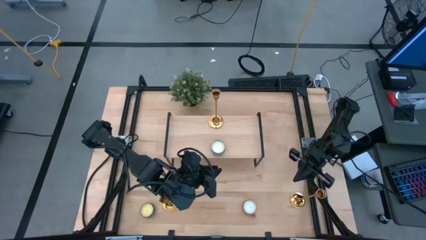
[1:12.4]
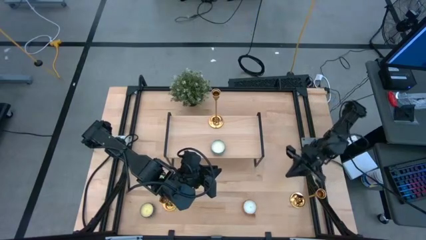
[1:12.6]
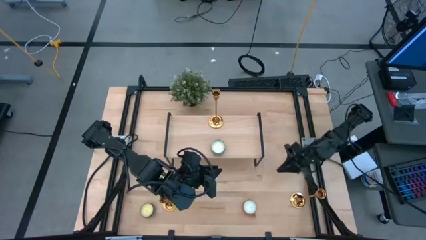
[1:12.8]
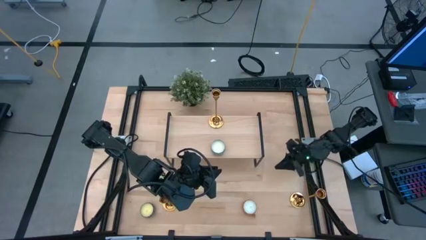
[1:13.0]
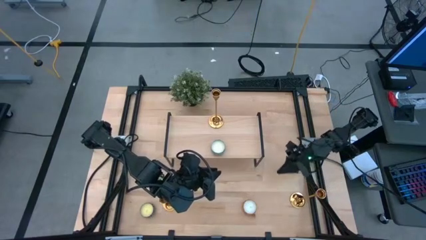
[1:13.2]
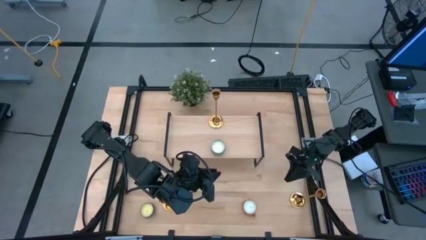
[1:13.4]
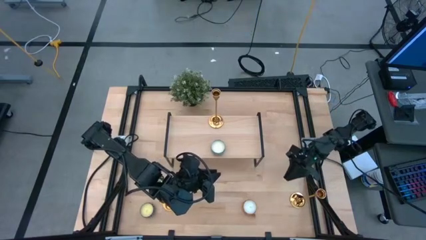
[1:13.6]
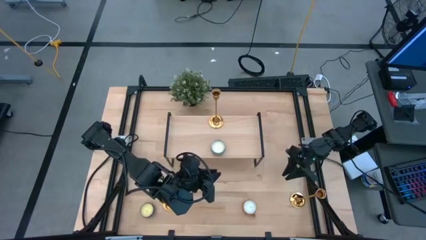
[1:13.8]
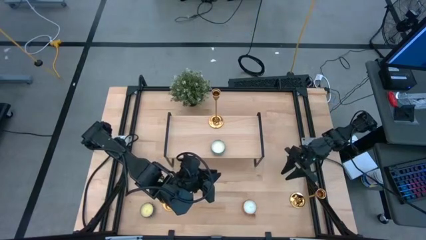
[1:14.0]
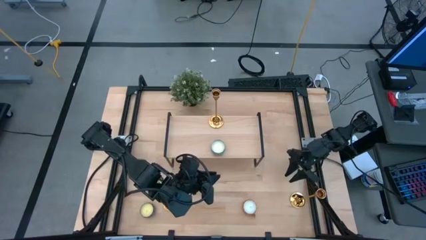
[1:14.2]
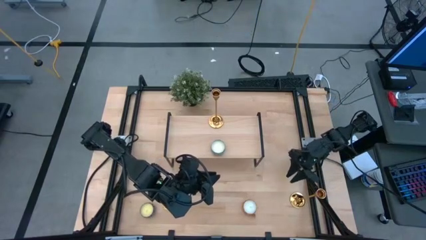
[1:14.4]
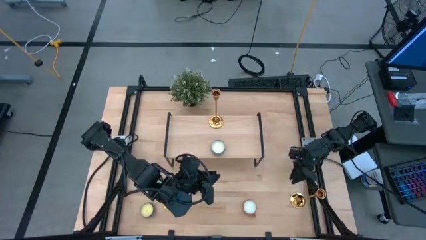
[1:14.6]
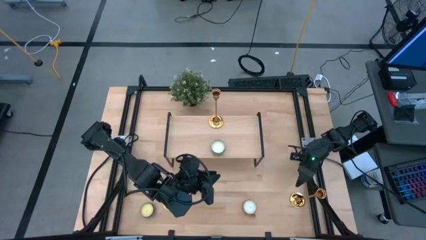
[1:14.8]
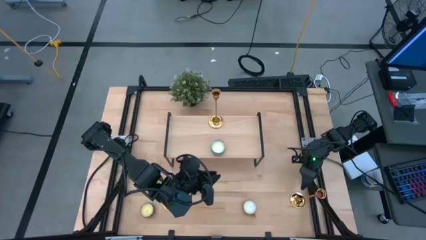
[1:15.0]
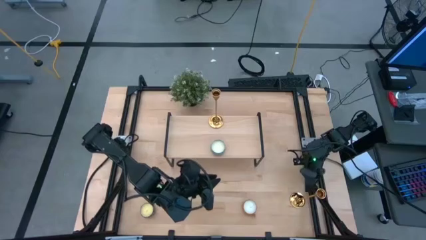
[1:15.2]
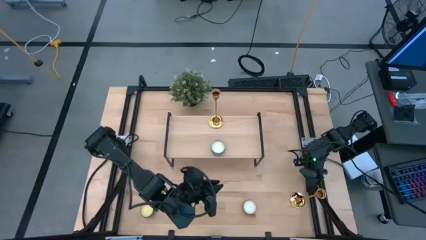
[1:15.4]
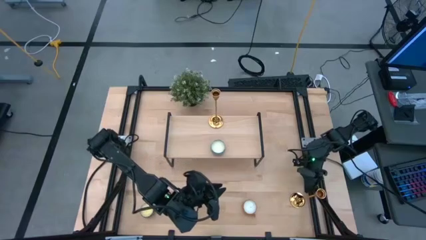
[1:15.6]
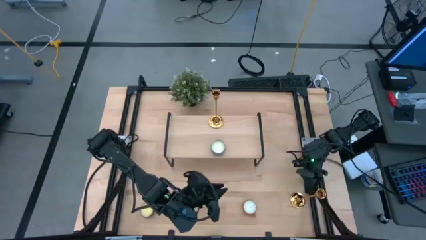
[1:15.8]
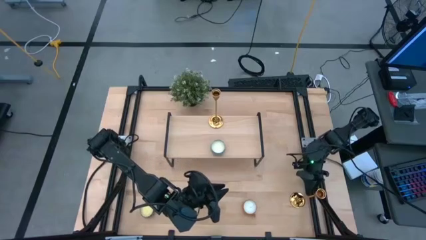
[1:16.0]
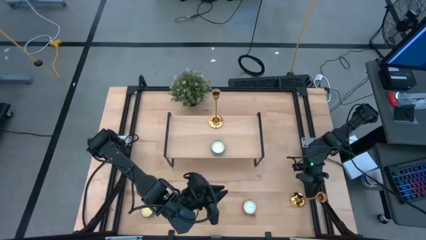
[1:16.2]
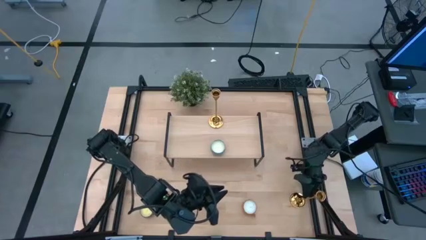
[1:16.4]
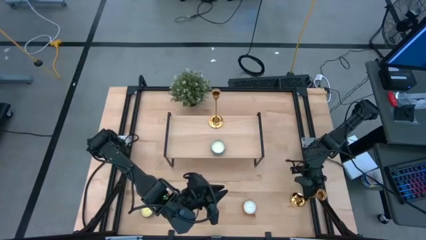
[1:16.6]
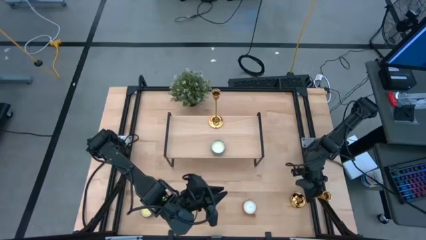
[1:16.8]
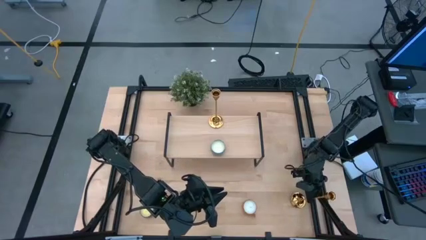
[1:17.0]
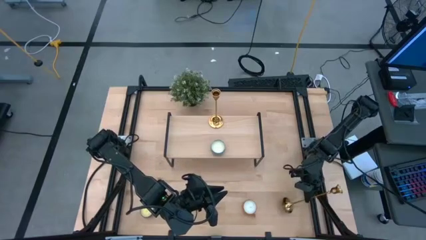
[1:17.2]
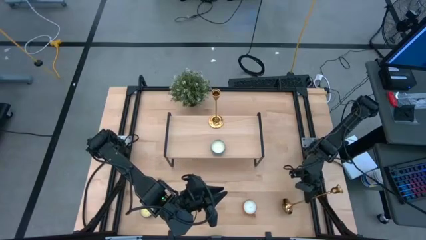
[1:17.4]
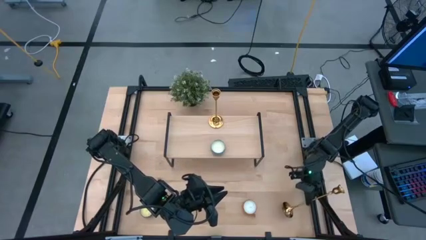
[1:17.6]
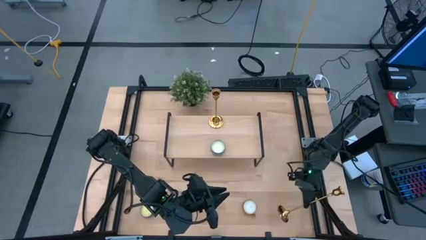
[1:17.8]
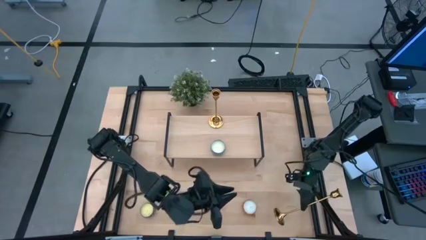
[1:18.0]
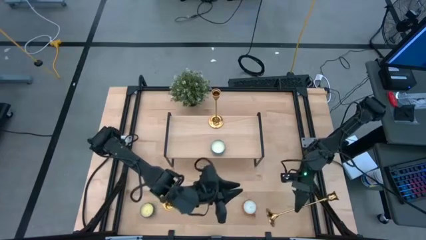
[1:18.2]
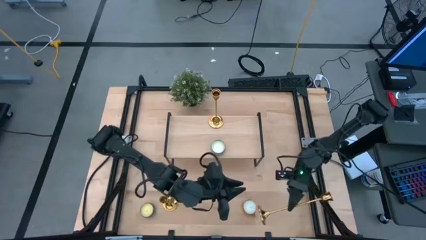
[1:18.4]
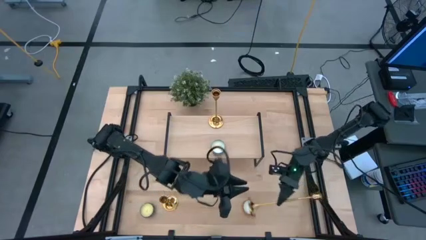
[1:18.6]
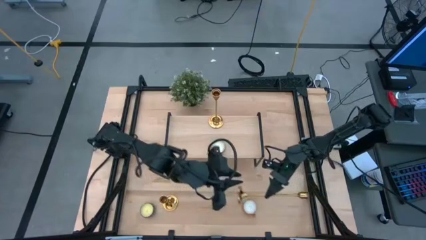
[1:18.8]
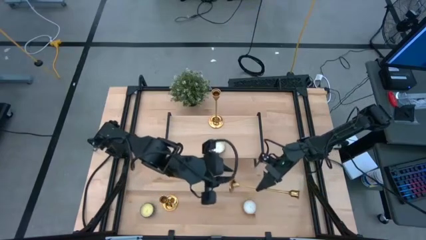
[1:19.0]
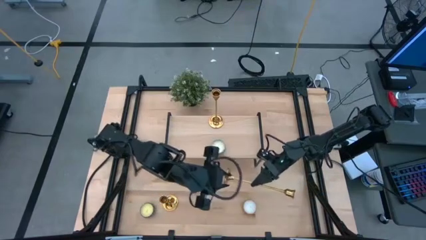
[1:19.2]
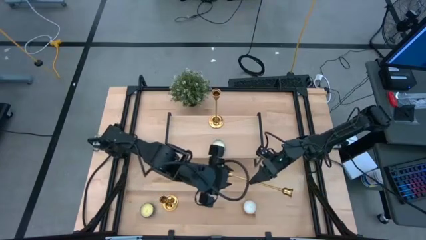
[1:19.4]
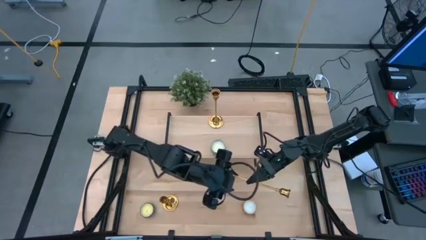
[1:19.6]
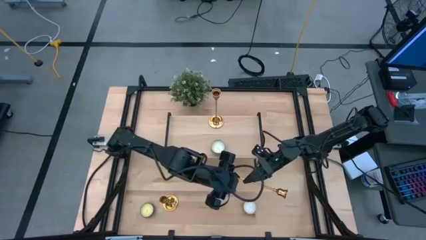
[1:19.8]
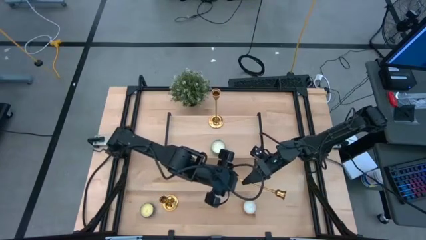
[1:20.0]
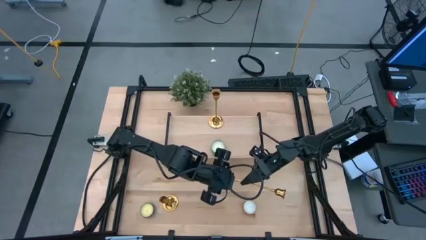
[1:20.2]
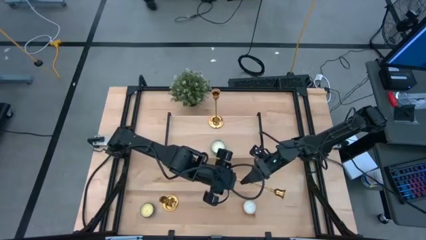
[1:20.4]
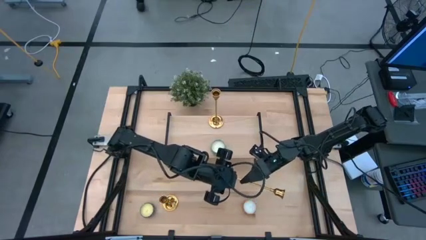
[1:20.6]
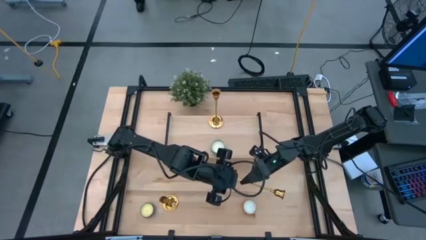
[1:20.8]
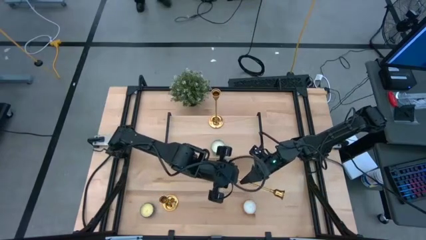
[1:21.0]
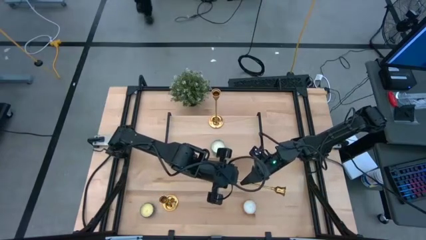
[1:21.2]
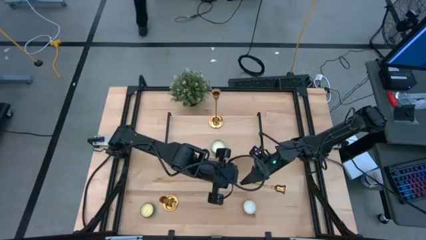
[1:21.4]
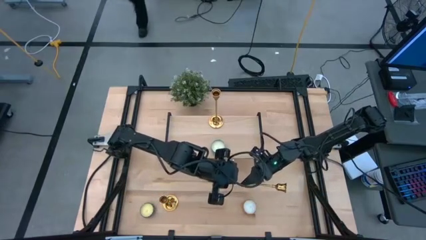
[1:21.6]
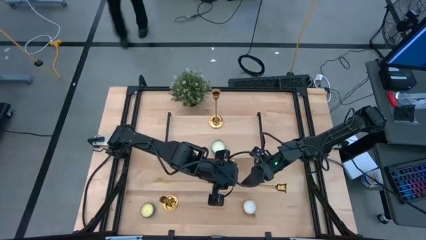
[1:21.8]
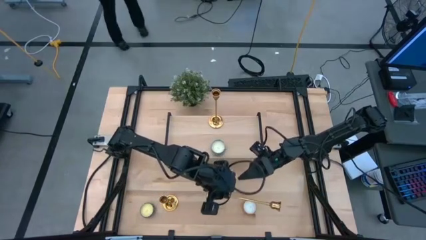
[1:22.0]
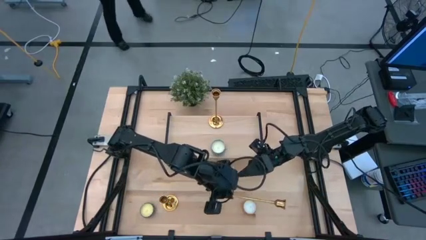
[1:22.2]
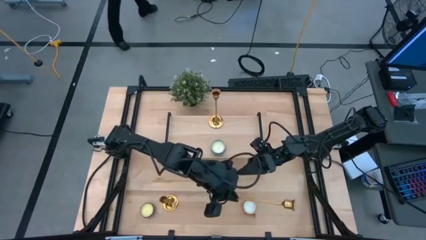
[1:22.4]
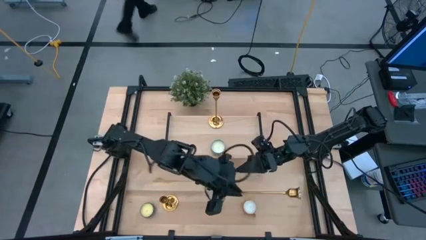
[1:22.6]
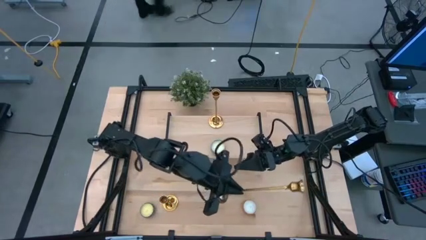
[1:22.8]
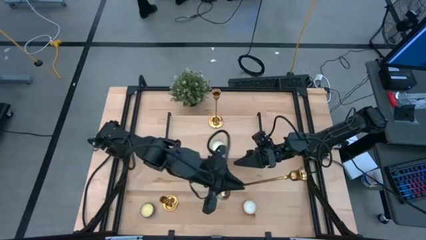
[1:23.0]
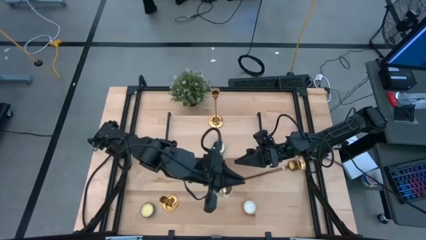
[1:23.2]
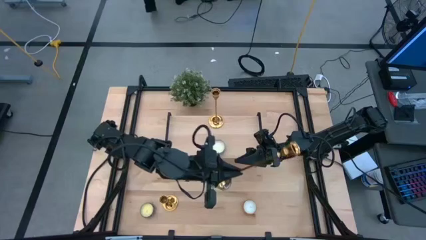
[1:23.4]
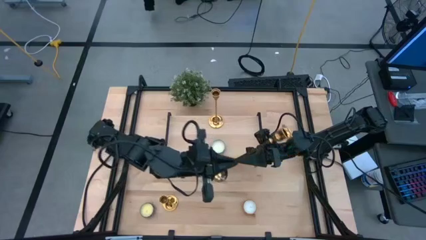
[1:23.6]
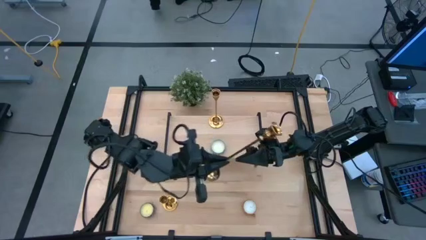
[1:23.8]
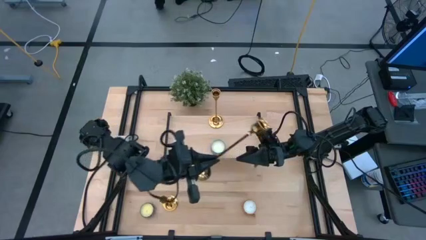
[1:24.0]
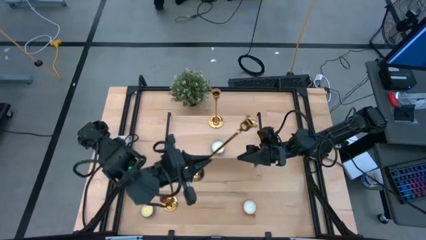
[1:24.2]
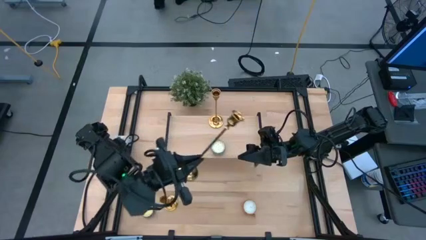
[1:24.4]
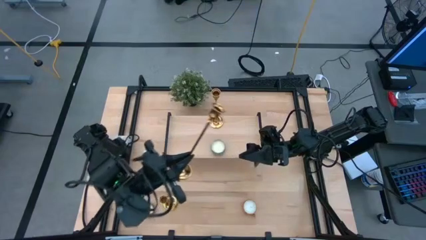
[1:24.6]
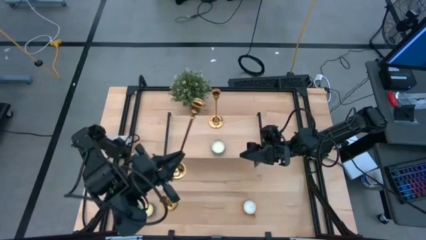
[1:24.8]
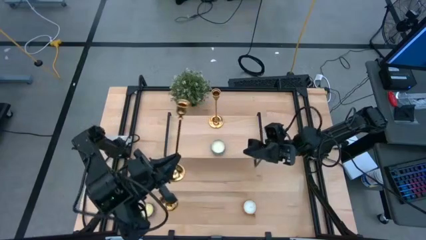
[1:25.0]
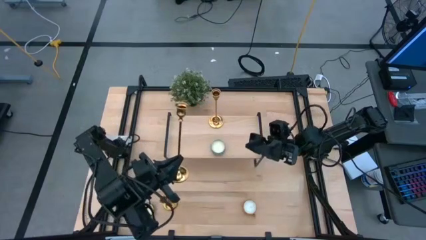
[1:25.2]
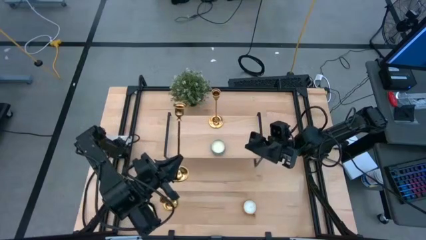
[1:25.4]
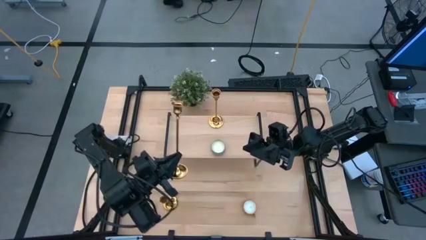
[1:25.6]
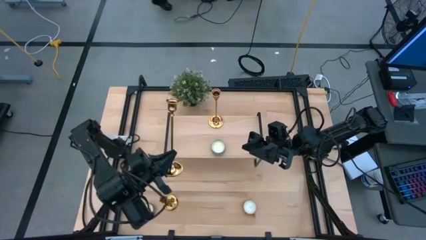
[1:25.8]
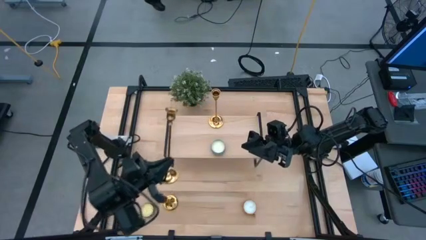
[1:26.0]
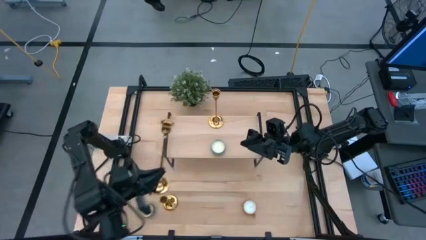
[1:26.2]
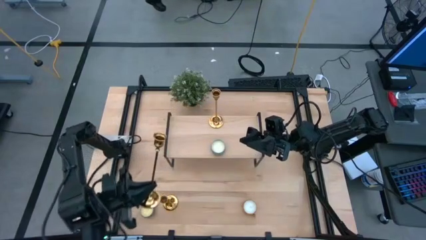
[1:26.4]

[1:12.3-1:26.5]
Task: Stock candles and holders on shelf
Align the right gold candle holder with the other gold candle holder on the shelf
